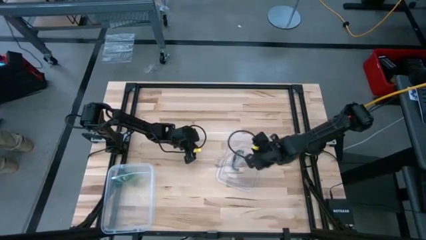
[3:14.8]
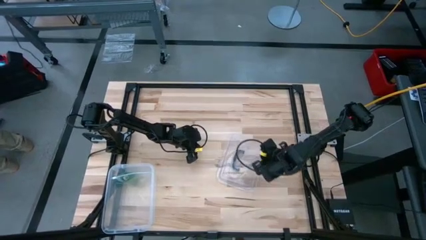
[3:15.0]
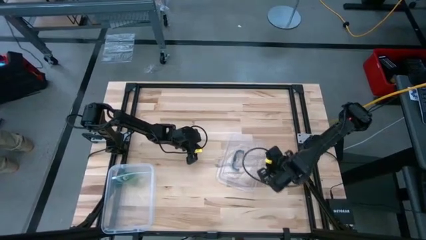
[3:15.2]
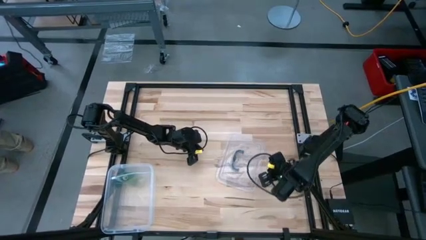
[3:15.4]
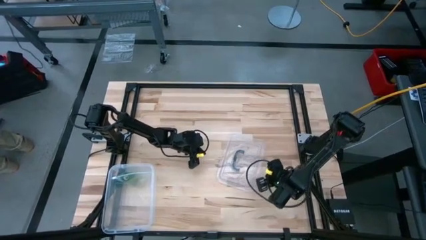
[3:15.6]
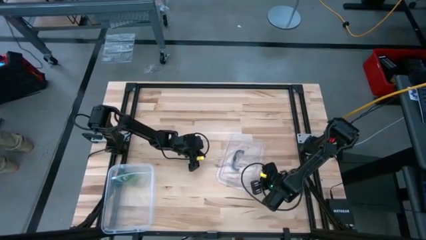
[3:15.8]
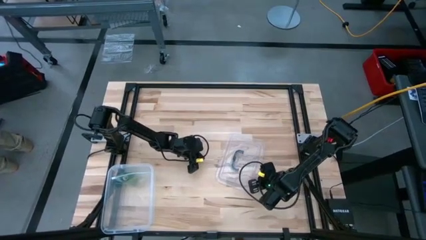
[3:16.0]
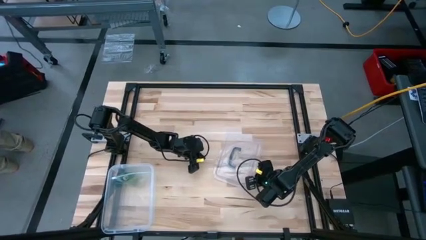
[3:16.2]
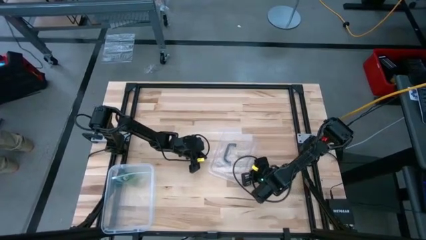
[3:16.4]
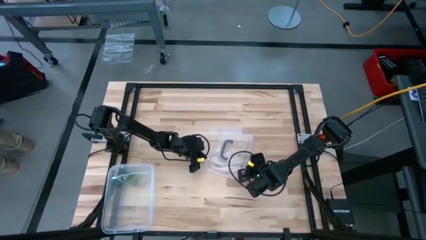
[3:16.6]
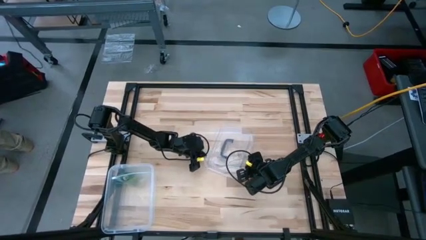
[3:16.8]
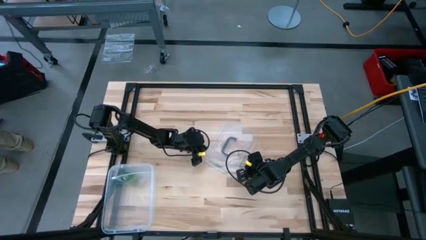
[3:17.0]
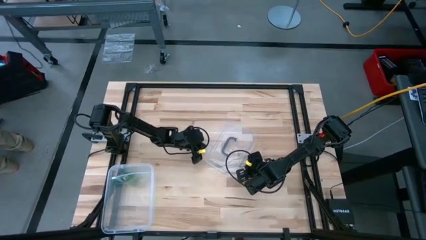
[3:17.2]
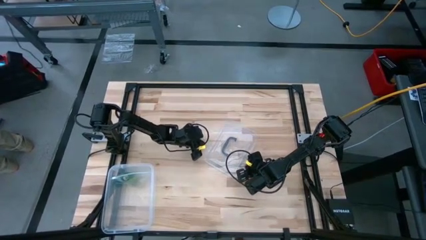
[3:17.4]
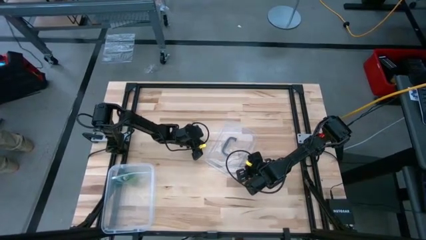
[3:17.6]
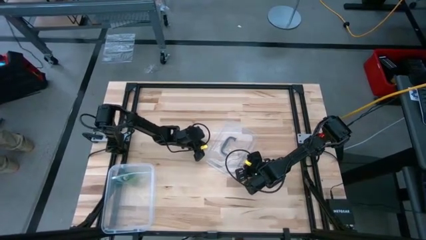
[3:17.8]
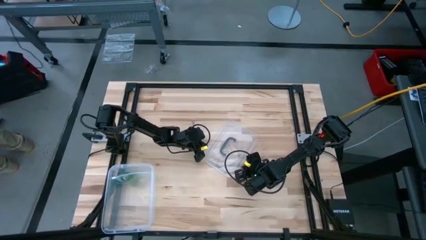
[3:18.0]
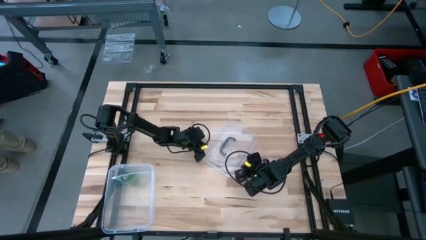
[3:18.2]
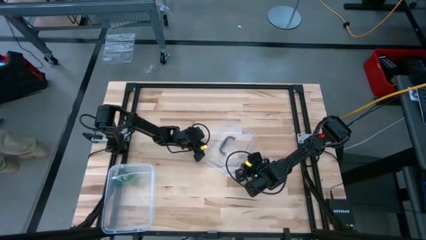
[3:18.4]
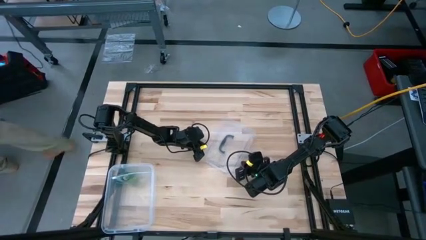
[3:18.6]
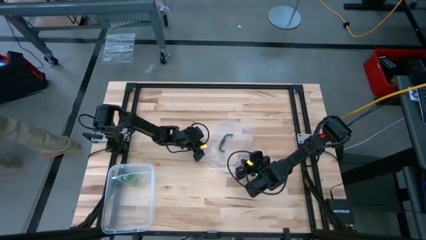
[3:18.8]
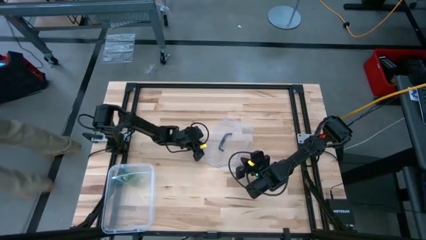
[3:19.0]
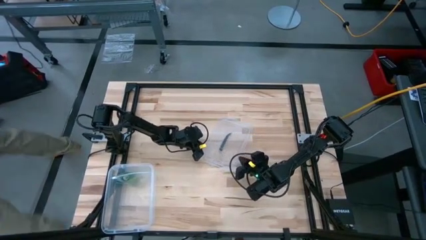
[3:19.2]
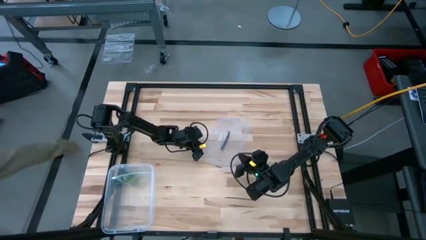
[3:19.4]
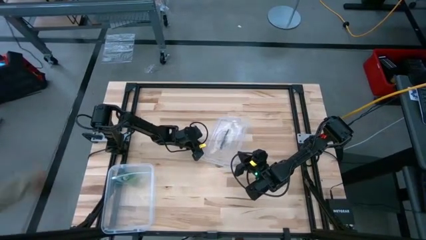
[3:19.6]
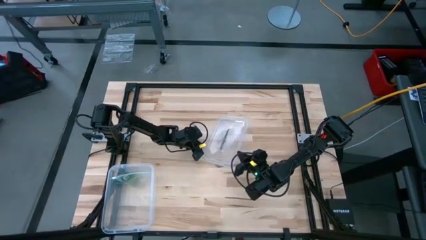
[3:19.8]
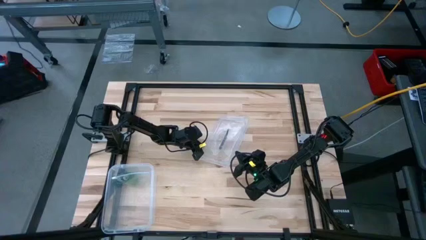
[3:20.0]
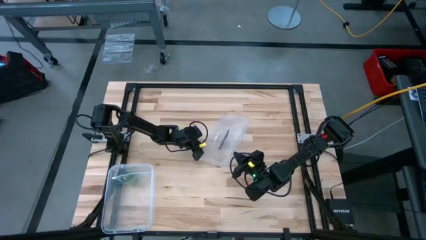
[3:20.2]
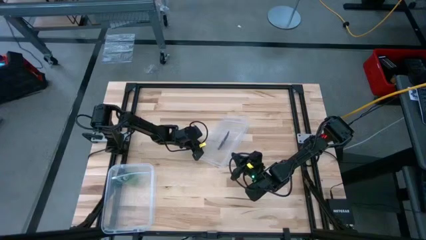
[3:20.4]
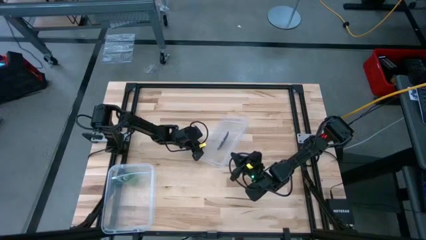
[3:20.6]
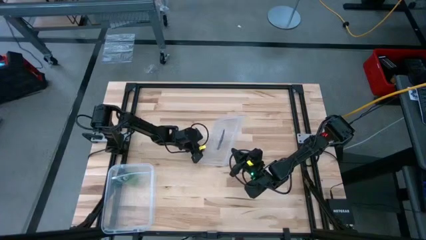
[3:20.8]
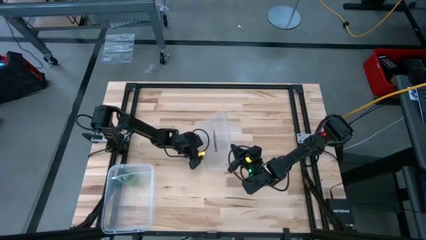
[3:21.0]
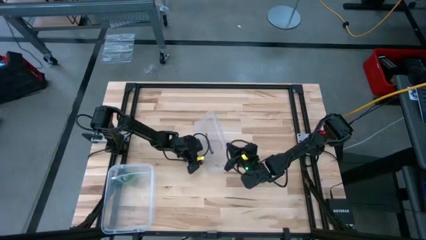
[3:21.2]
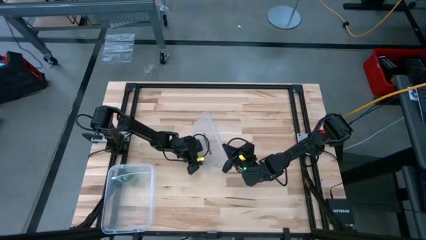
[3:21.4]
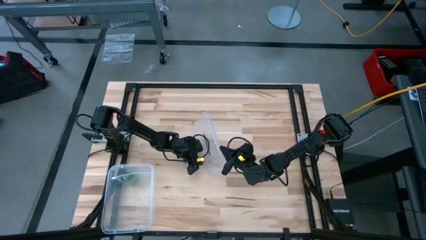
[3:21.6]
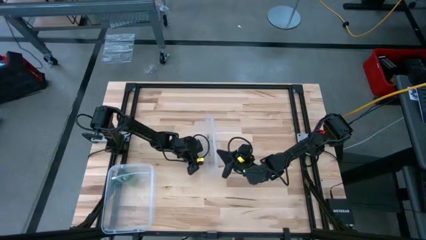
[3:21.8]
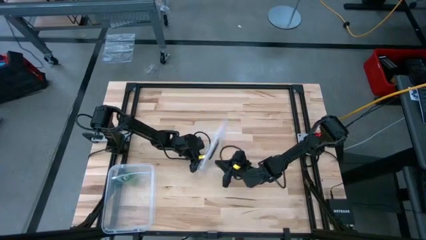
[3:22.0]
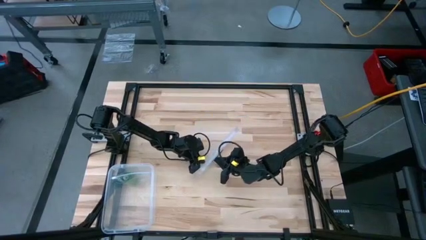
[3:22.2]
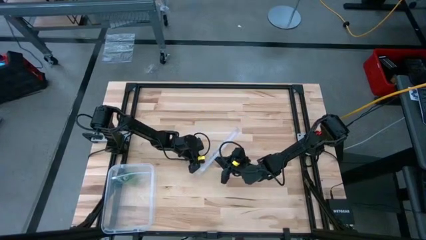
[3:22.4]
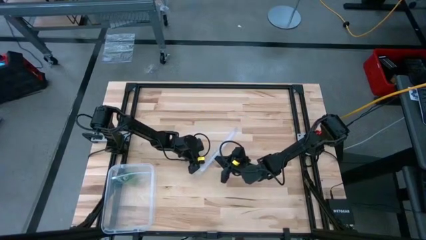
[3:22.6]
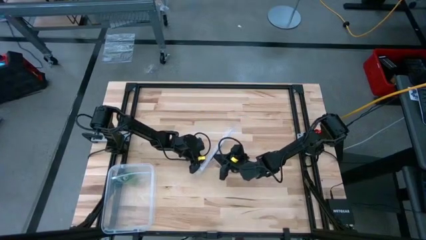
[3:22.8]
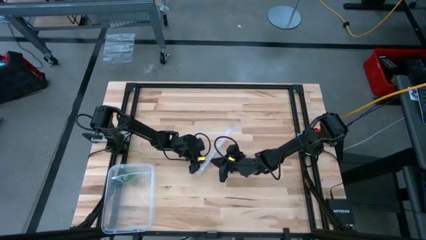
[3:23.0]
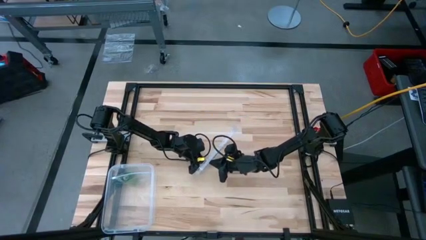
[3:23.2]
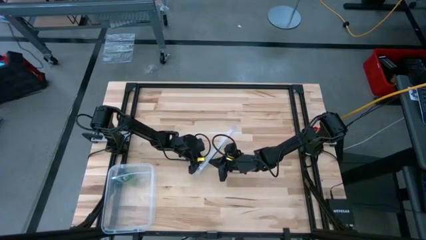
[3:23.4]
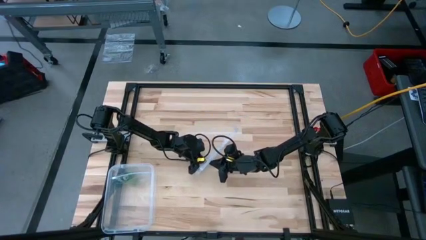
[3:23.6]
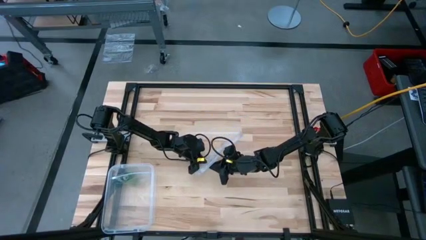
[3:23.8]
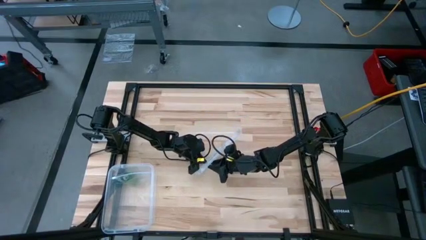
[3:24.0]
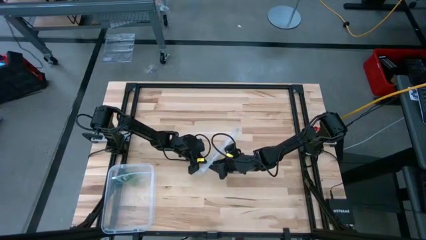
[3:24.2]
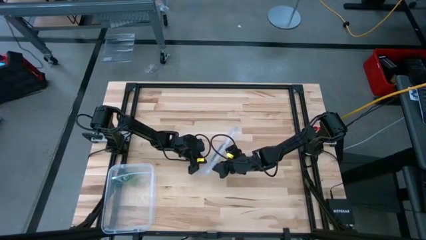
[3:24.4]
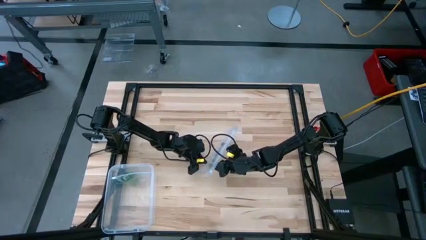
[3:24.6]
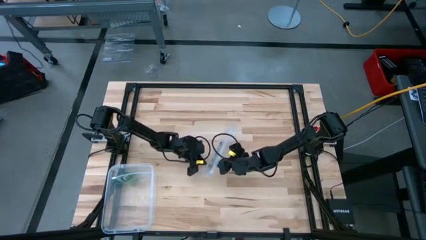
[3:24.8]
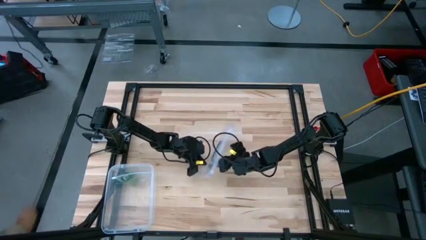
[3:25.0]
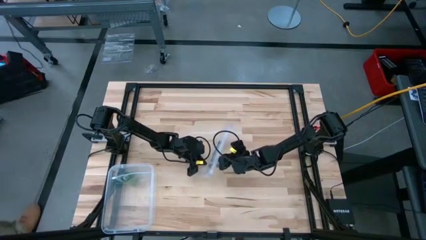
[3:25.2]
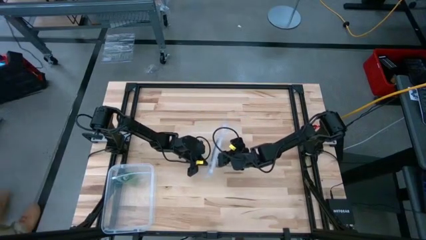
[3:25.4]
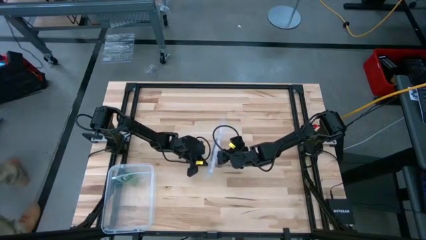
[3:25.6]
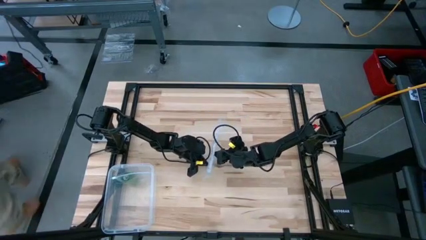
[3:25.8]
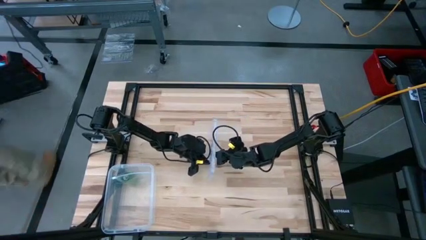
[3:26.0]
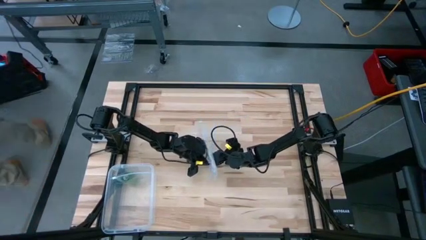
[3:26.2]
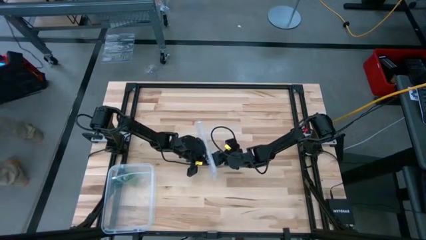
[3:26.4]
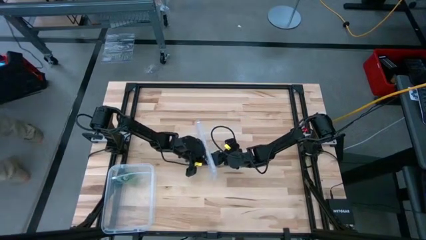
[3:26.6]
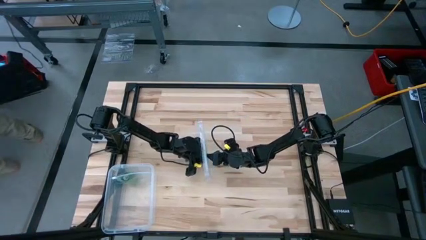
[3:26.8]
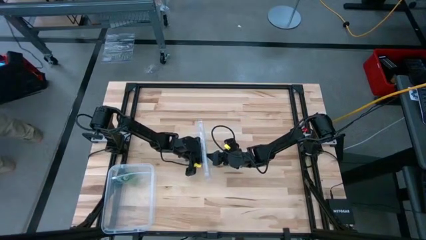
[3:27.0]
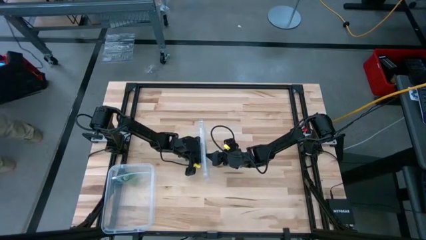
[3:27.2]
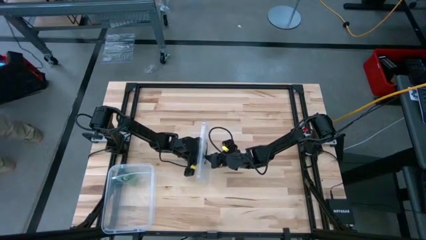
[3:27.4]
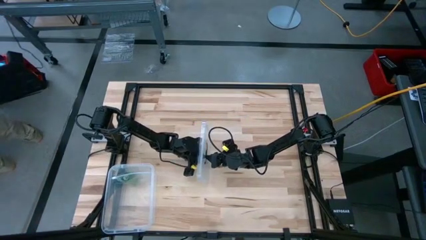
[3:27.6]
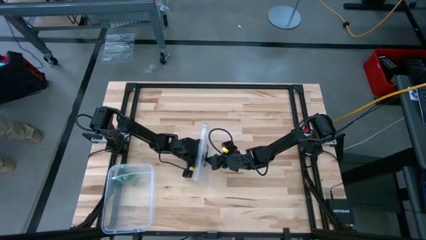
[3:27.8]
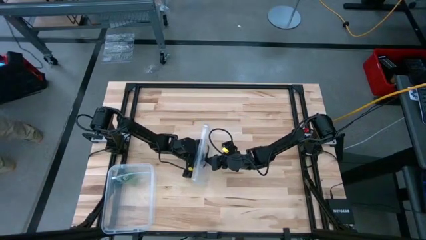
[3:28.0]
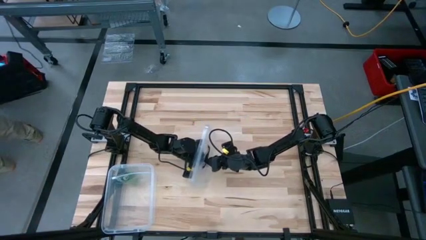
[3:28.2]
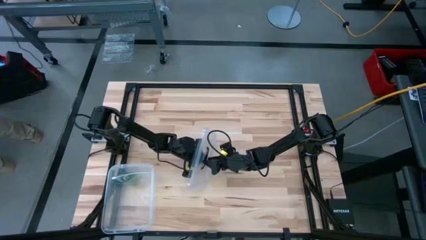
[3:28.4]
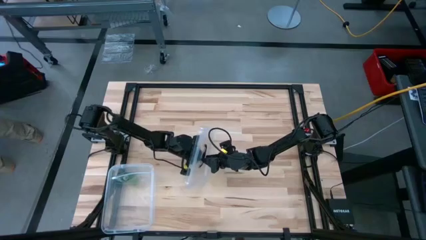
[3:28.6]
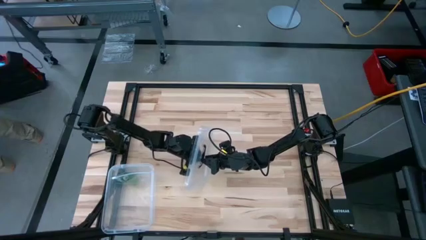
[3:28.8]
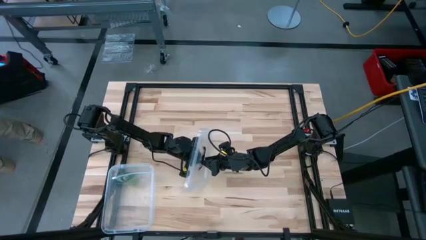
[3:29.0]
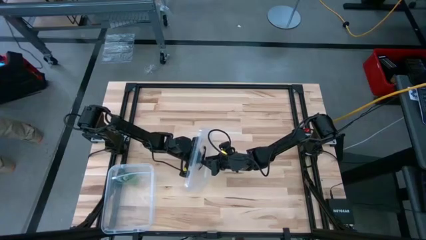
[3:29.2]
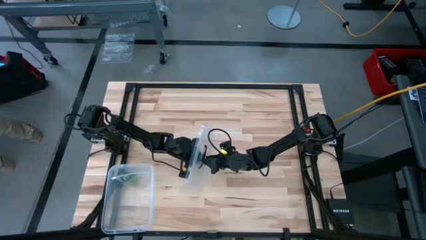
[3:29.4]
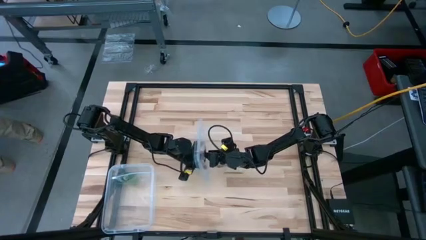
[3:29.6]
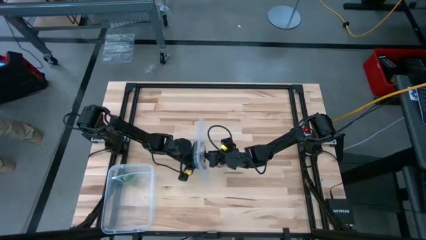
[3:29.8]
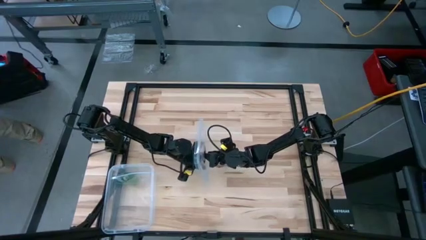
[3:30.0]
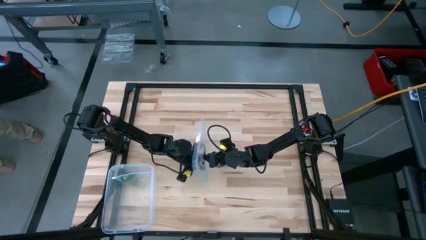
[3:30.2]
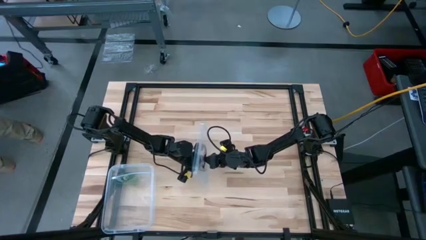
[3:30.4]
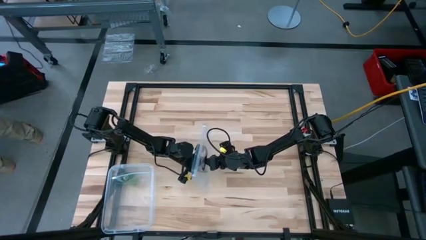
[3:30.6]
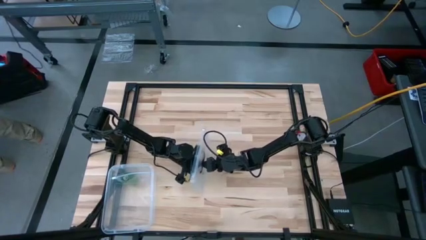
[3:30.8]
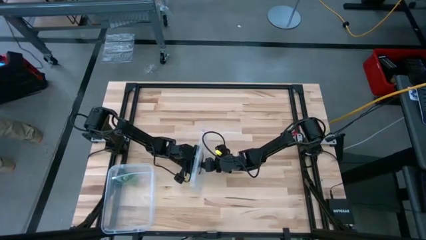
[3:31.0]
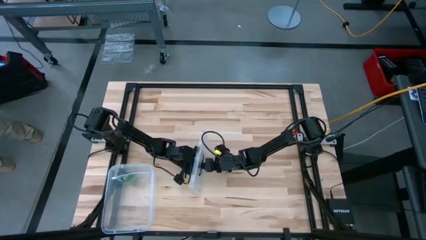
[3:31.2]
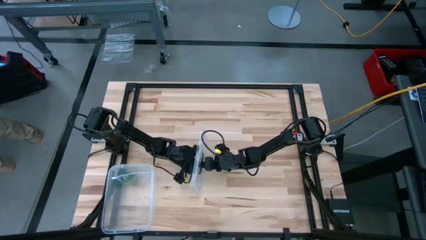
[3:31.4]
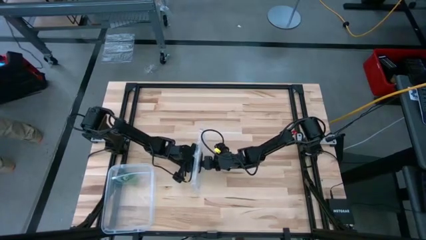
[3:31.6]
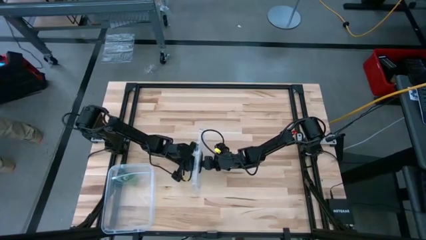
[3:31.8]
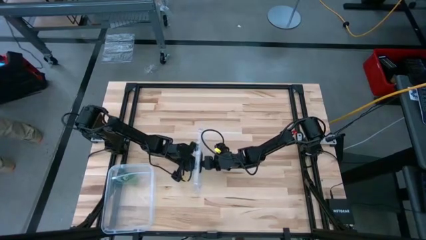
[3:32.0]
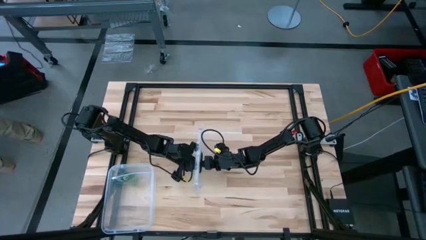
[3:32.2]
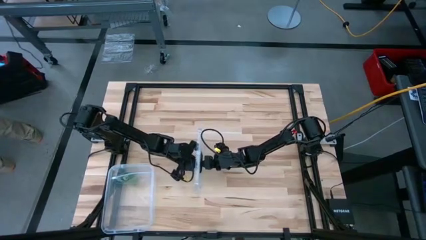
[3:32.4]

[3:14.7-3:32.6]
Task: Roll bandage
Put the transparent lid on the transparent bin
